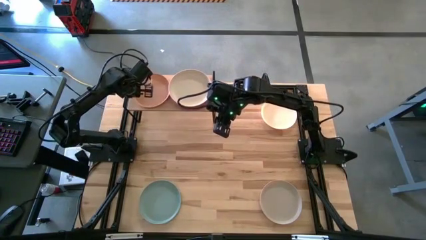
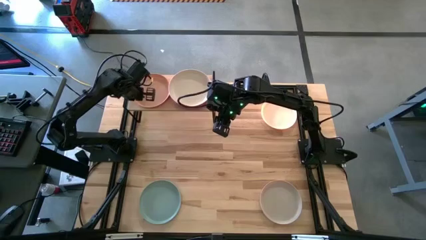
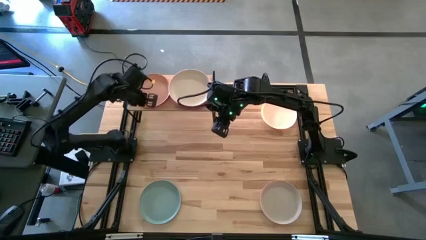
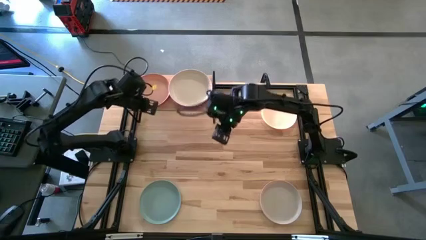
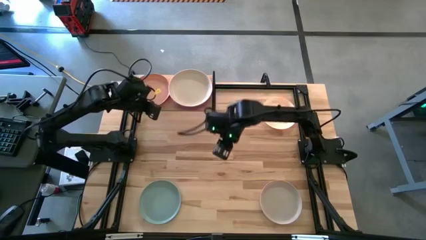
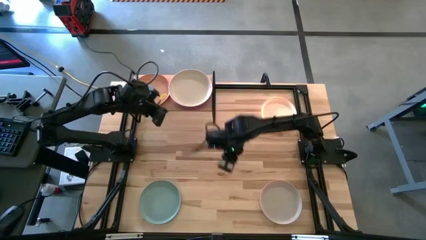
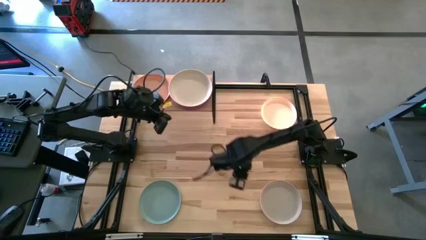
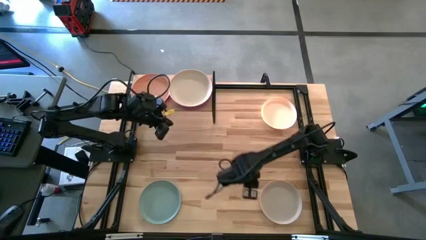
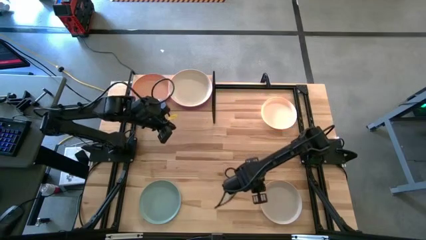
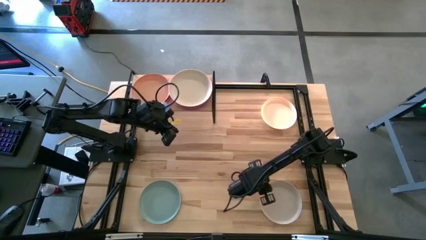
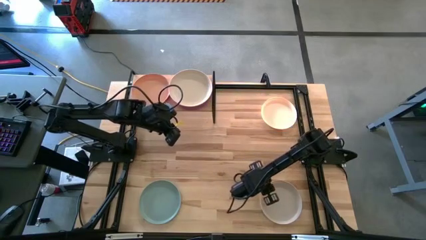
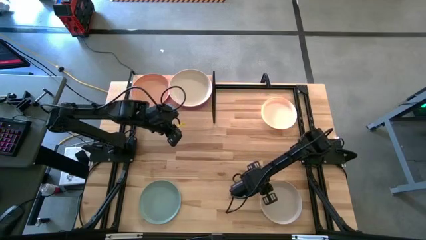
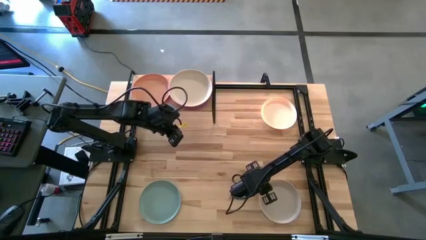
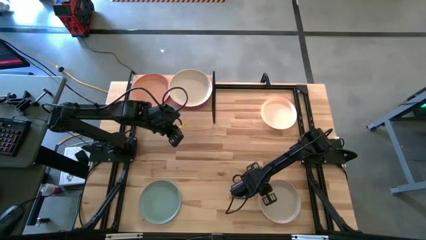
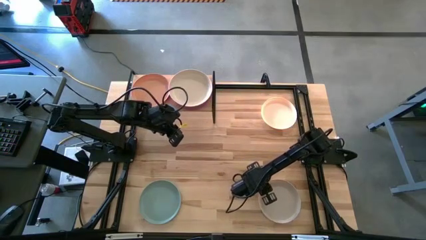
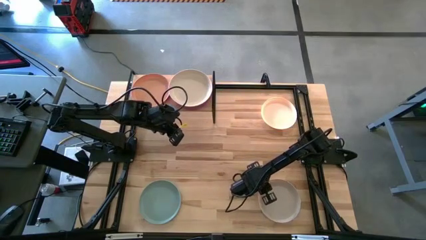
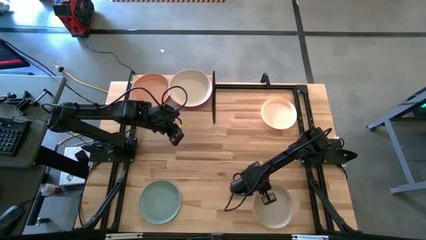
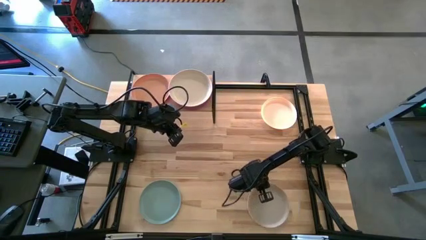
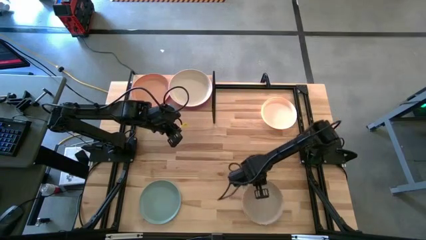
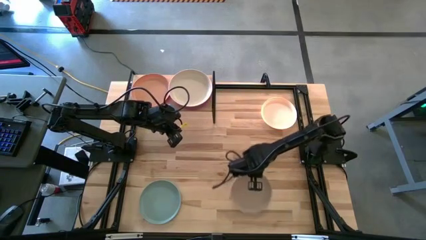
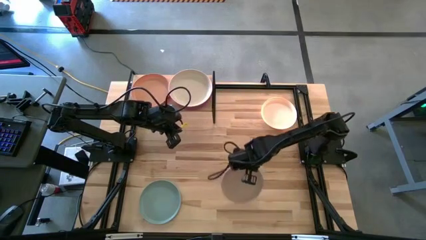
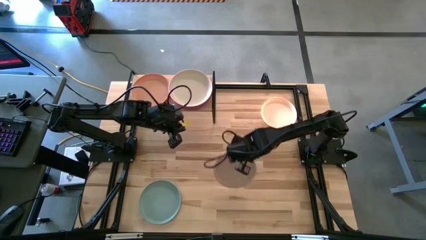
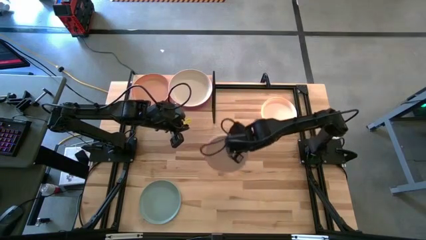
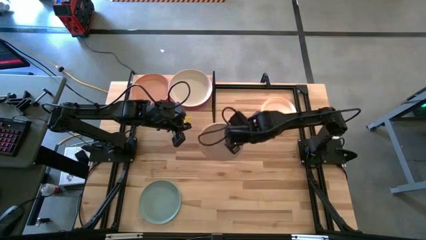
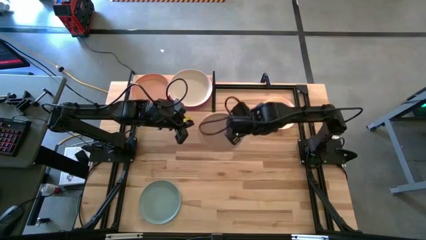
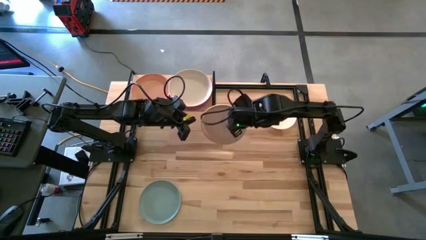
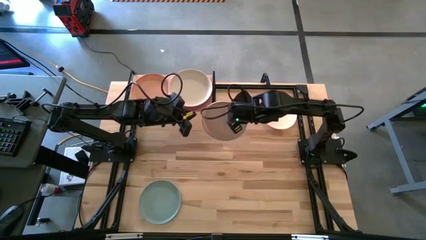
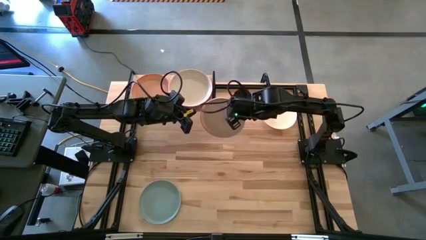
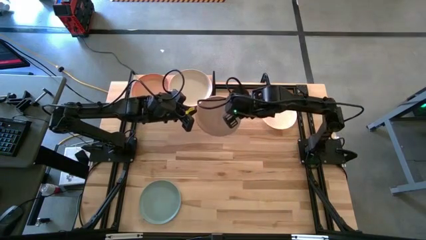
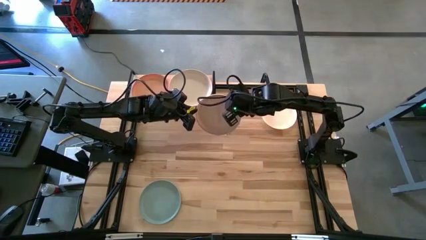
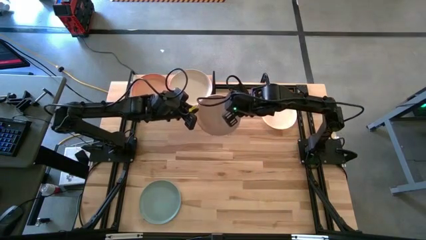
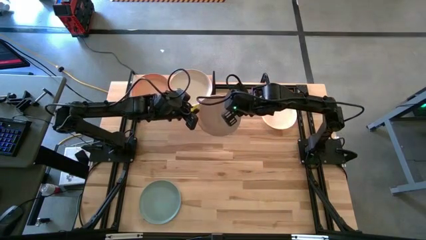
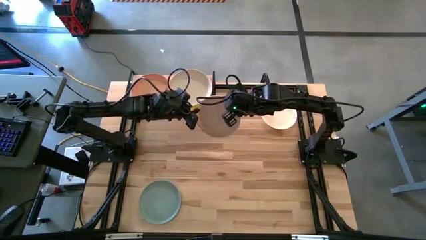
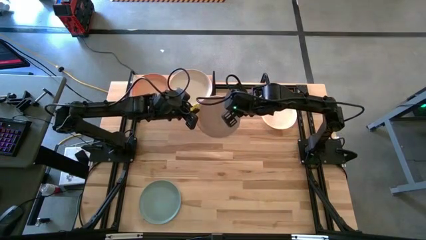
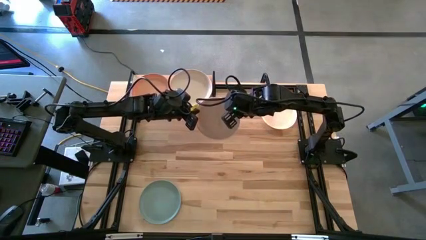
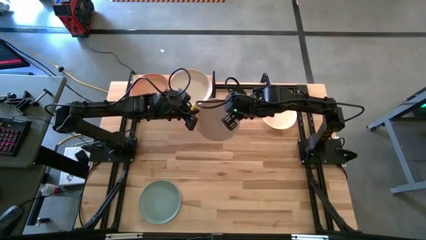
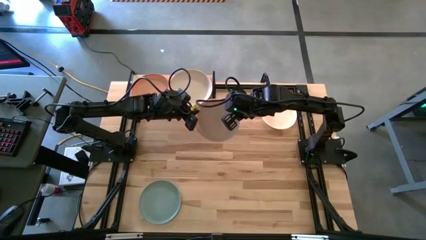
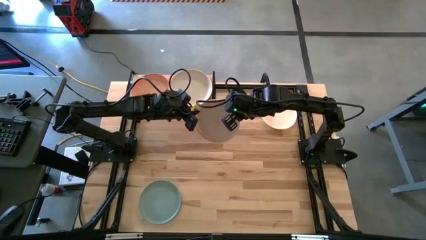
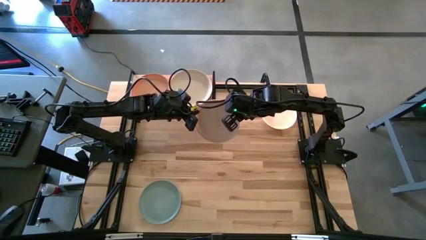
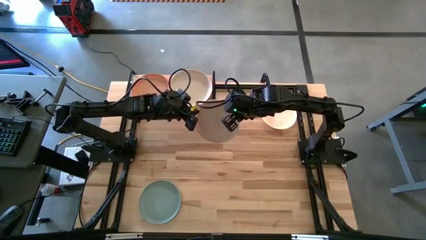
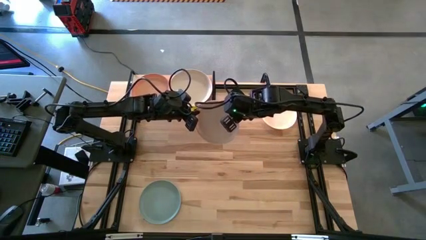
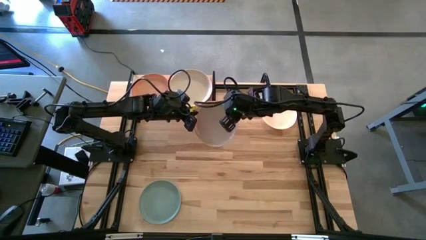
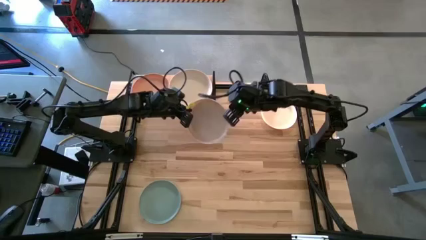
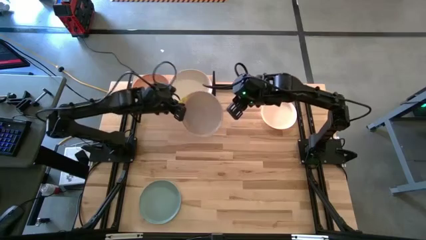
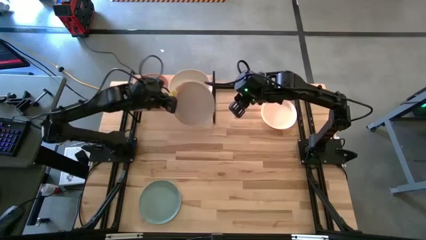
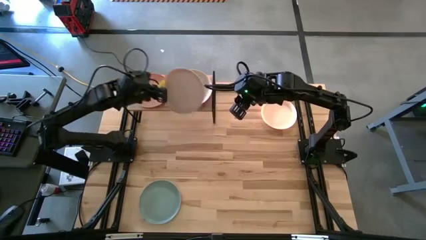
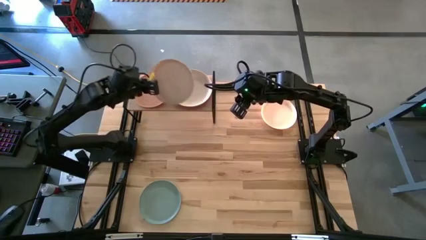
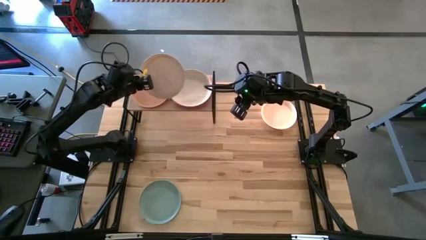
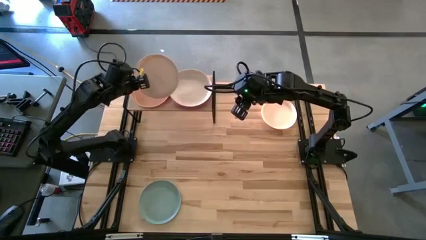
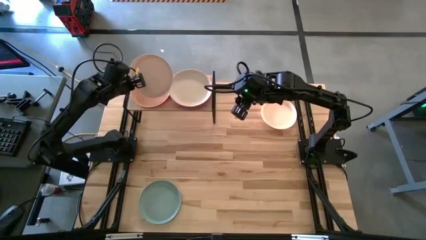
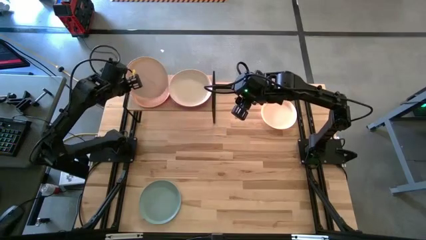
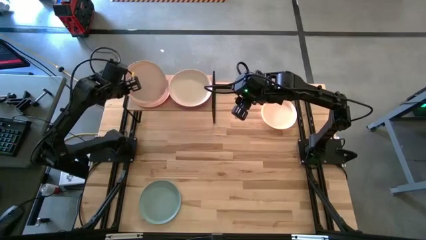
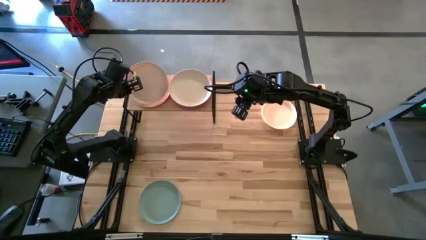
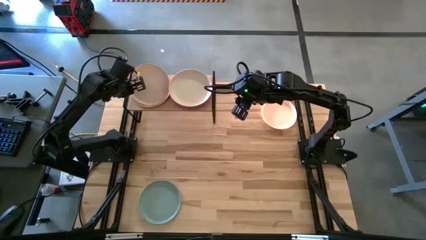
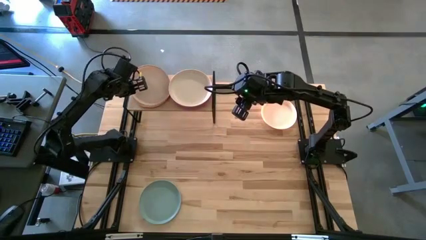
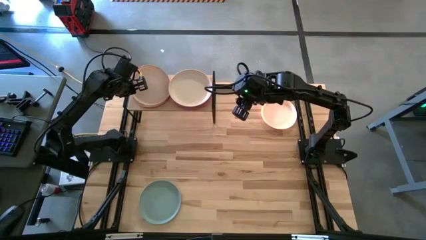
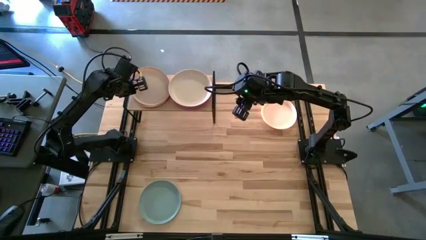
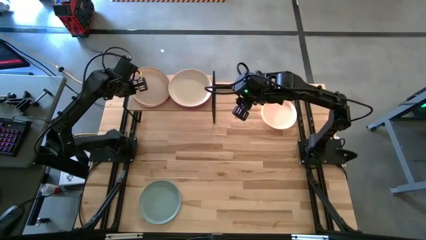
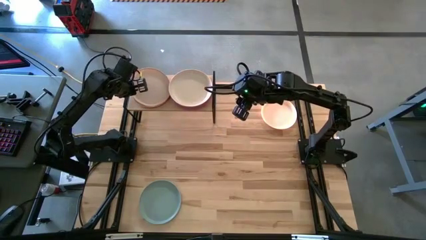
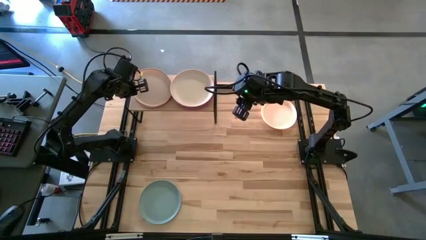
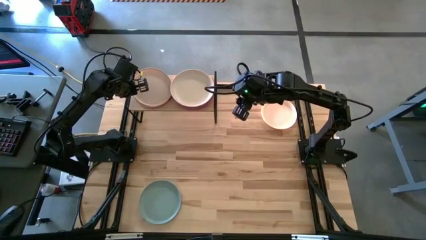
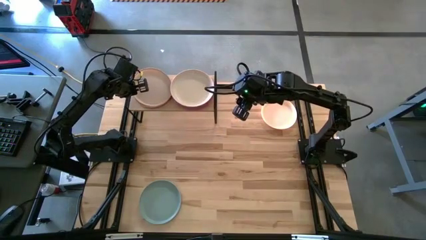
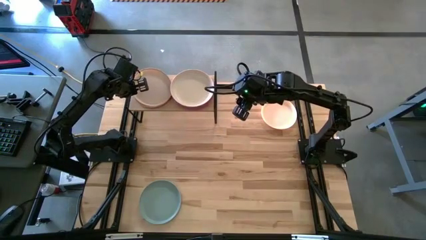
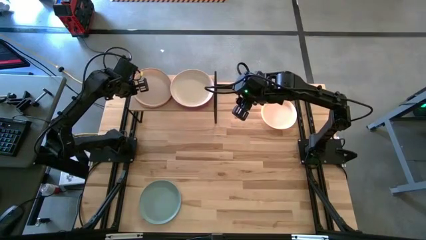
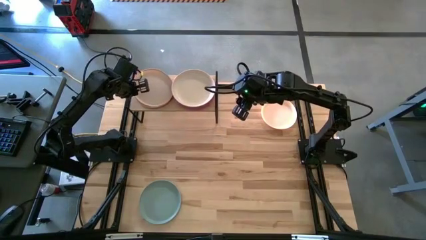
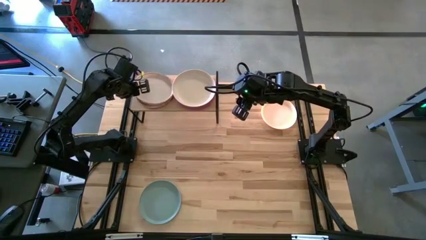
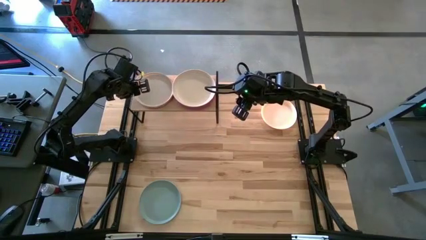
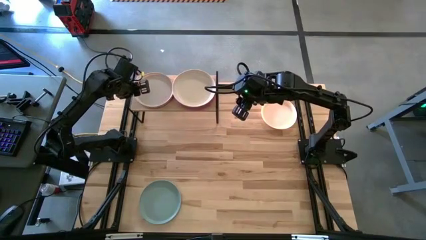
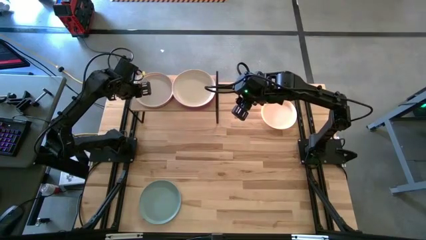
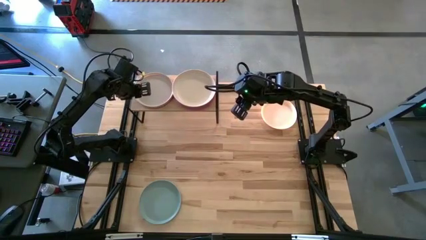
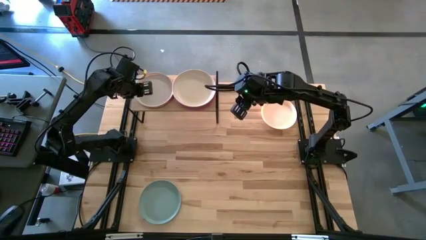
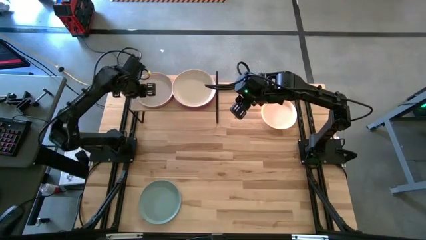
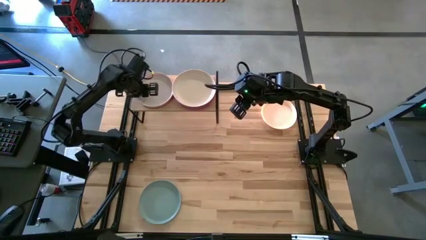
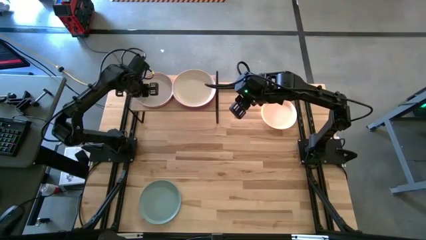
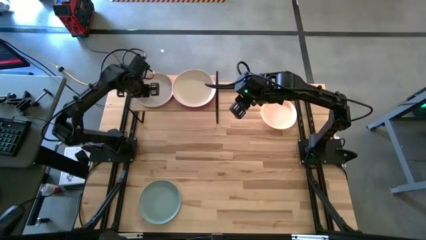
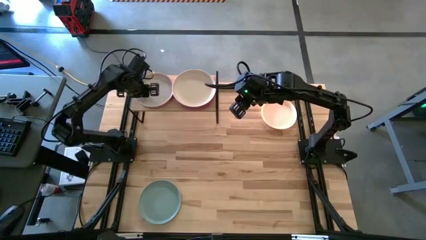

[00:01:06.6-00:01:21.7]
Task: Place and stack plates onto a shelf
Stack the bottom white plate on top of the light orange plate
